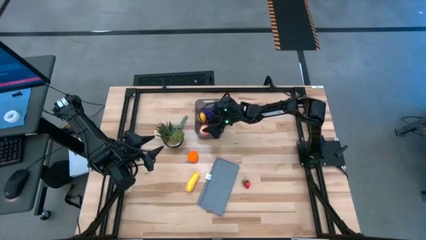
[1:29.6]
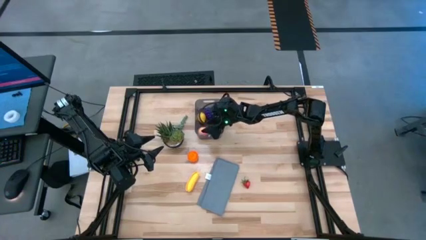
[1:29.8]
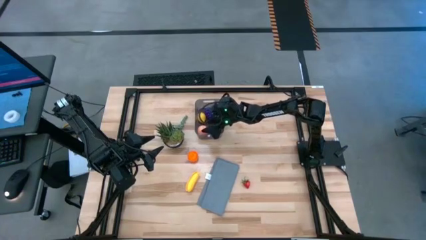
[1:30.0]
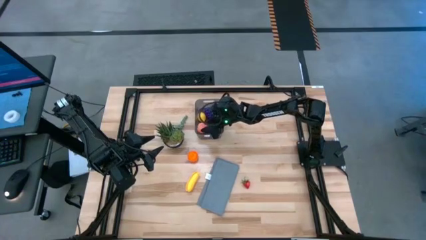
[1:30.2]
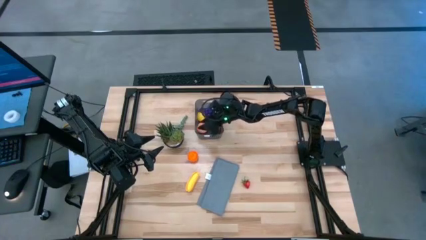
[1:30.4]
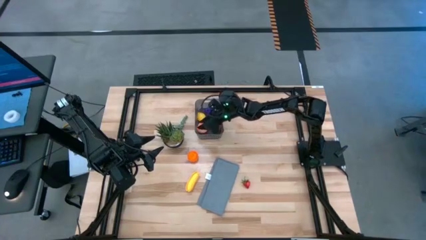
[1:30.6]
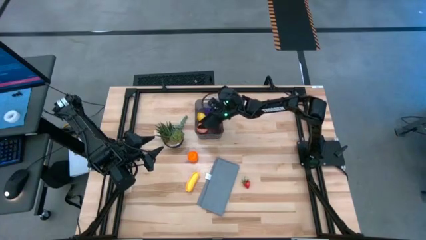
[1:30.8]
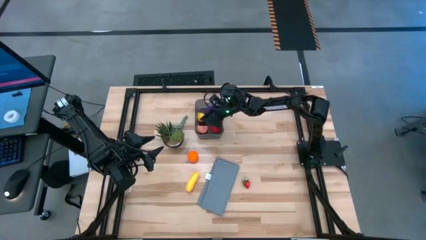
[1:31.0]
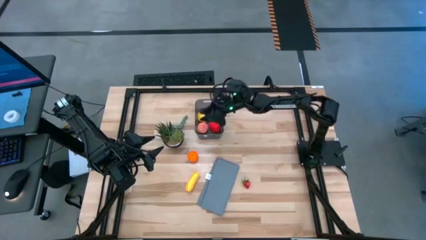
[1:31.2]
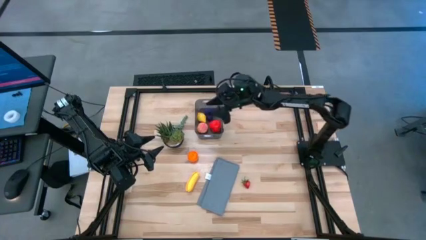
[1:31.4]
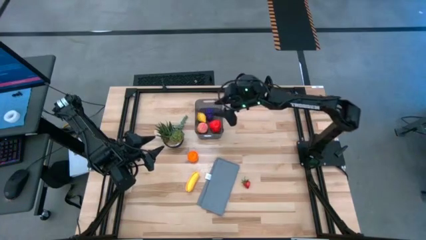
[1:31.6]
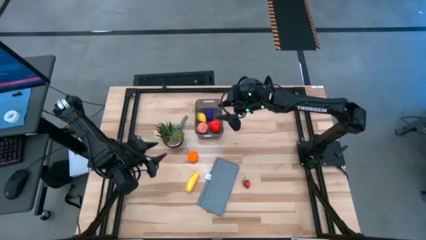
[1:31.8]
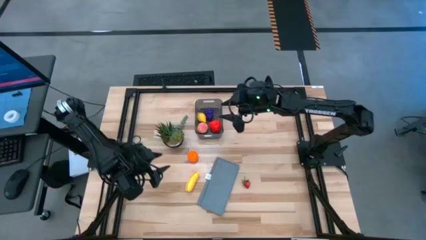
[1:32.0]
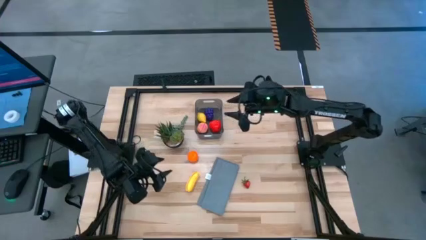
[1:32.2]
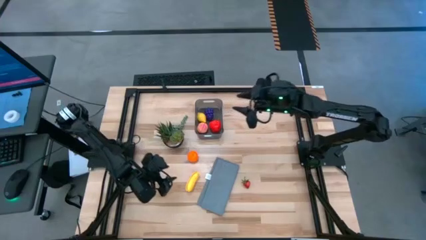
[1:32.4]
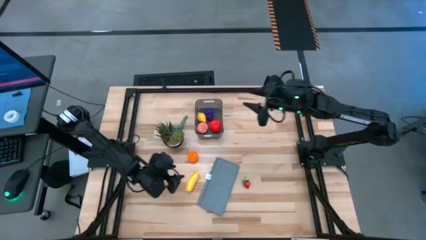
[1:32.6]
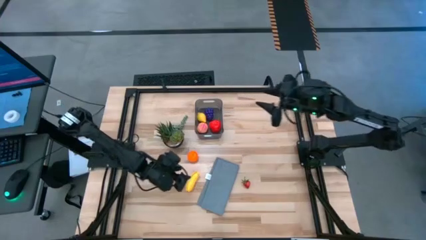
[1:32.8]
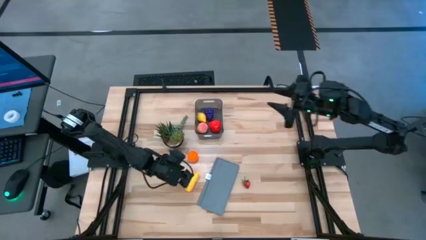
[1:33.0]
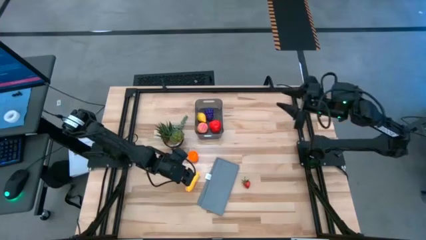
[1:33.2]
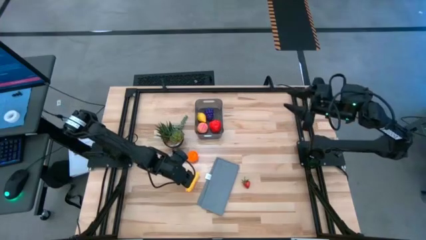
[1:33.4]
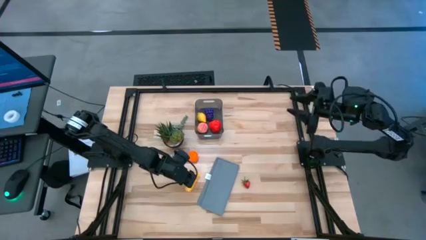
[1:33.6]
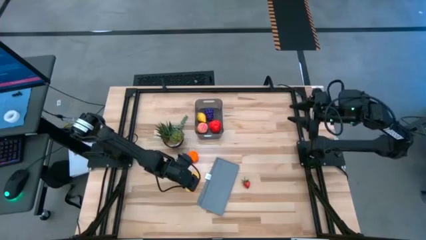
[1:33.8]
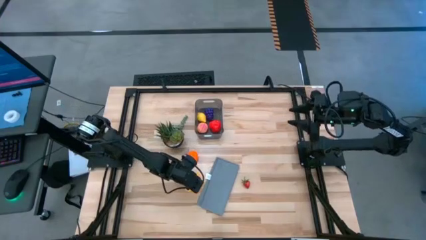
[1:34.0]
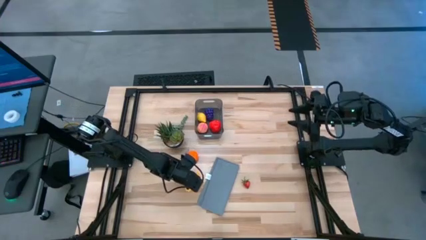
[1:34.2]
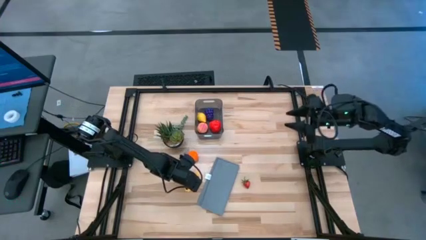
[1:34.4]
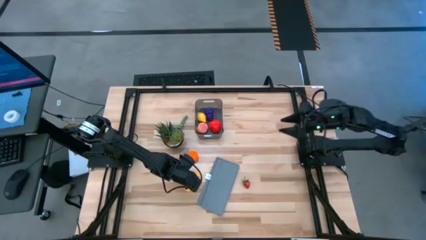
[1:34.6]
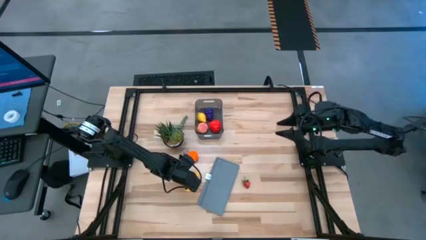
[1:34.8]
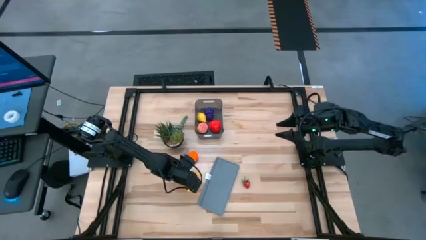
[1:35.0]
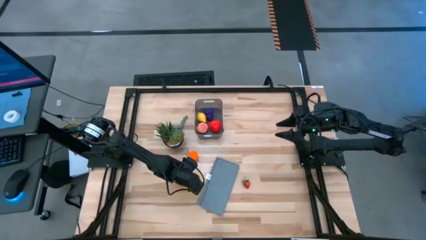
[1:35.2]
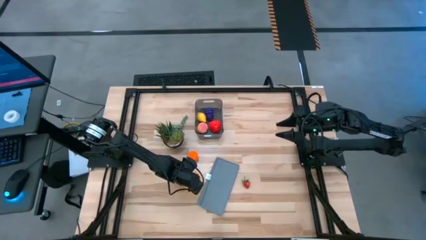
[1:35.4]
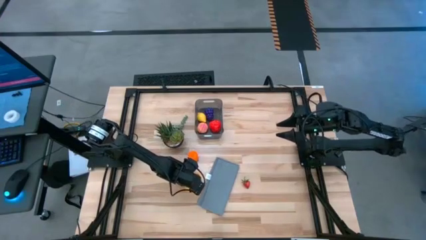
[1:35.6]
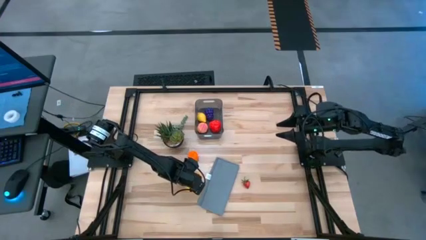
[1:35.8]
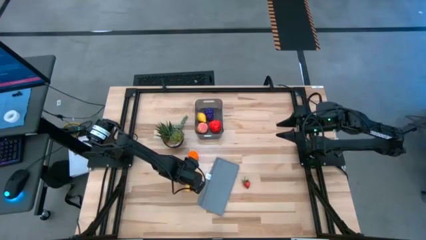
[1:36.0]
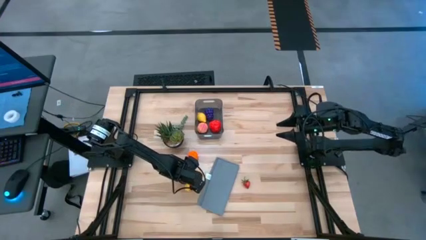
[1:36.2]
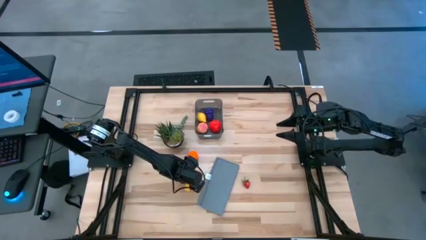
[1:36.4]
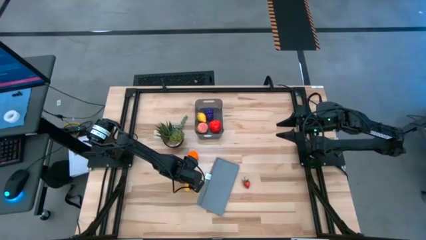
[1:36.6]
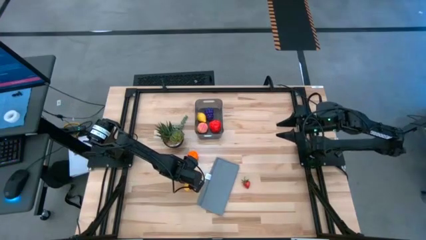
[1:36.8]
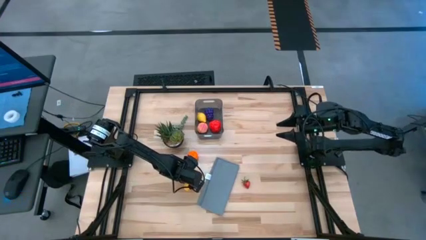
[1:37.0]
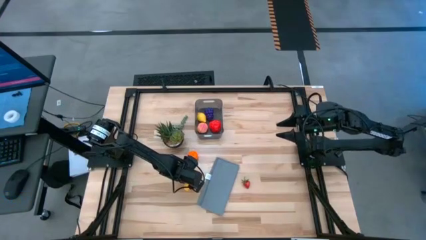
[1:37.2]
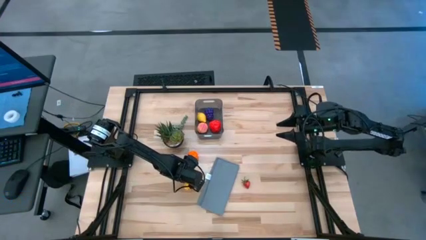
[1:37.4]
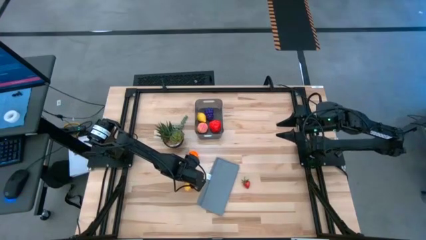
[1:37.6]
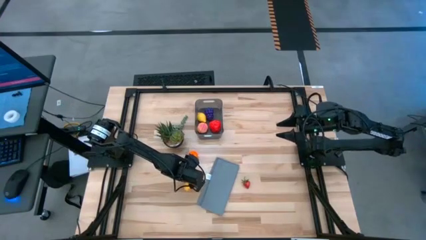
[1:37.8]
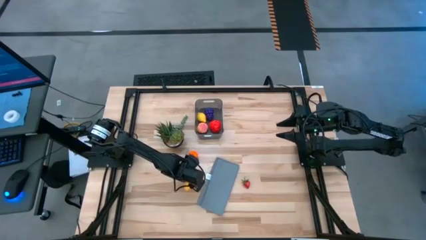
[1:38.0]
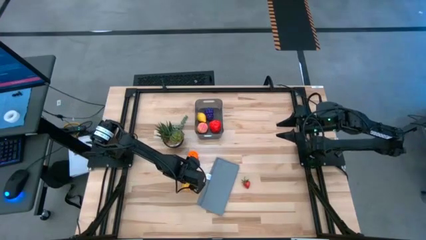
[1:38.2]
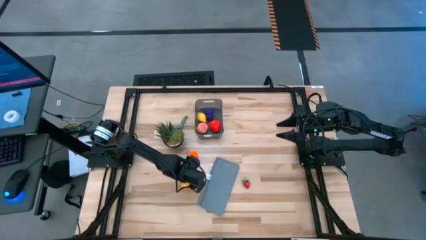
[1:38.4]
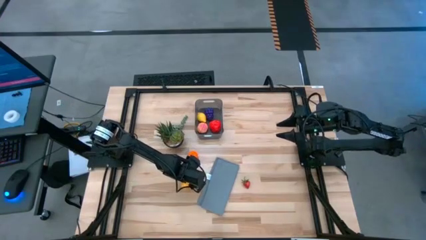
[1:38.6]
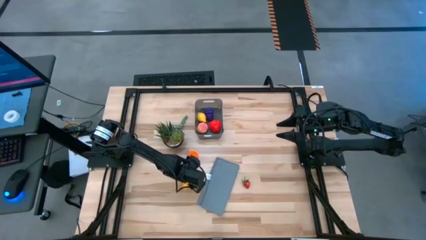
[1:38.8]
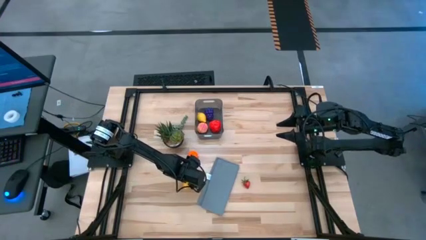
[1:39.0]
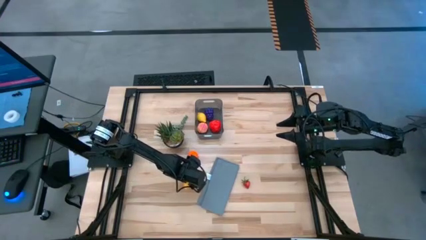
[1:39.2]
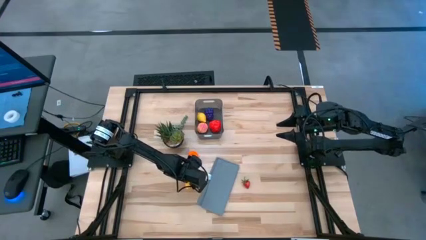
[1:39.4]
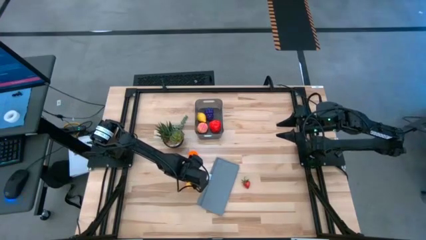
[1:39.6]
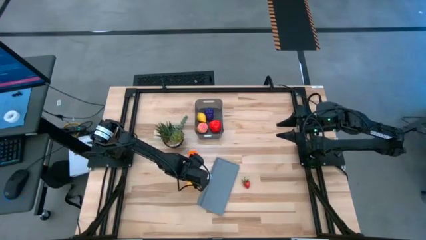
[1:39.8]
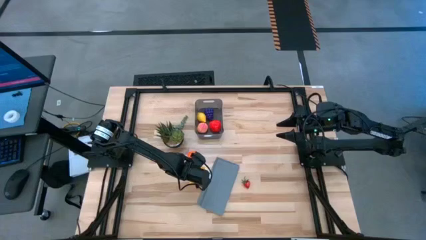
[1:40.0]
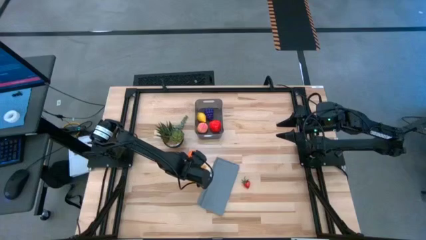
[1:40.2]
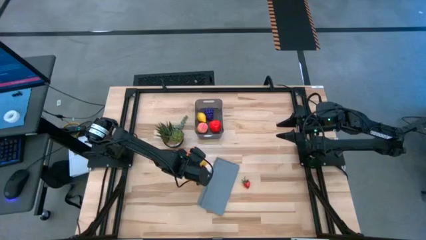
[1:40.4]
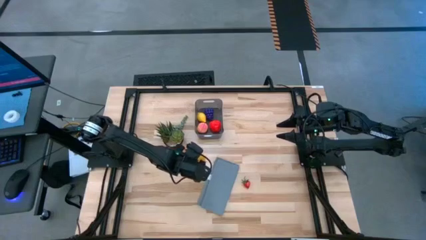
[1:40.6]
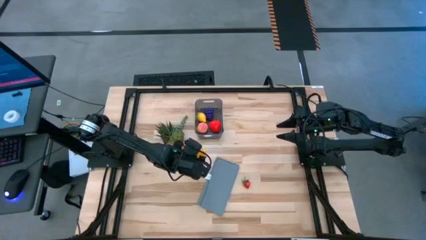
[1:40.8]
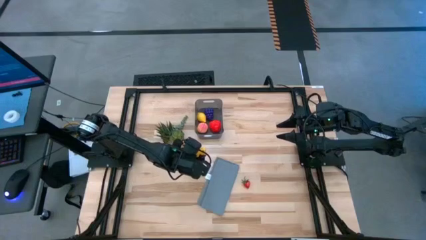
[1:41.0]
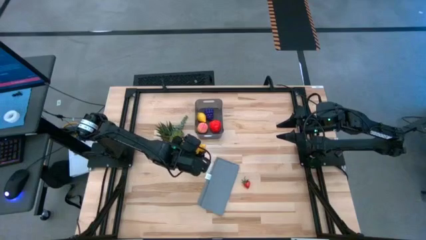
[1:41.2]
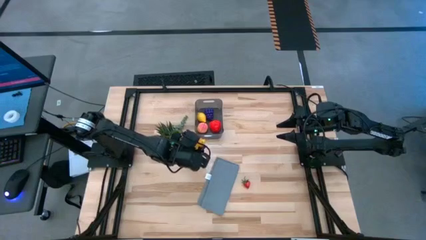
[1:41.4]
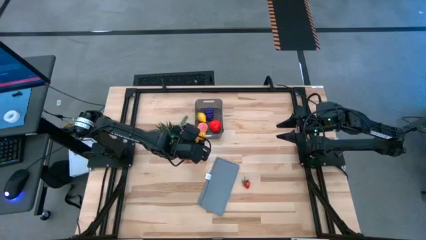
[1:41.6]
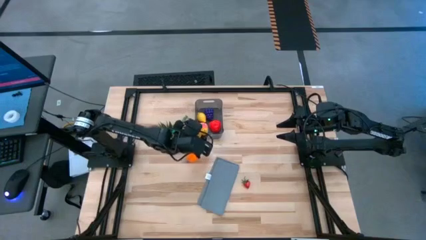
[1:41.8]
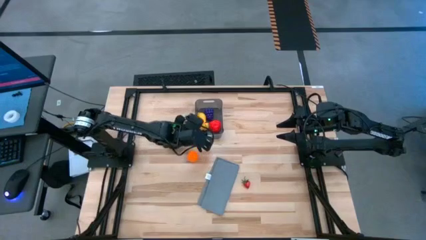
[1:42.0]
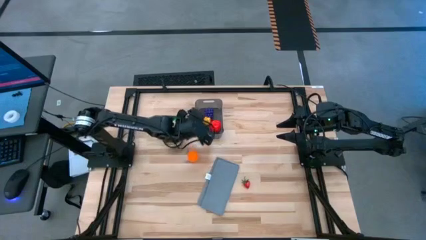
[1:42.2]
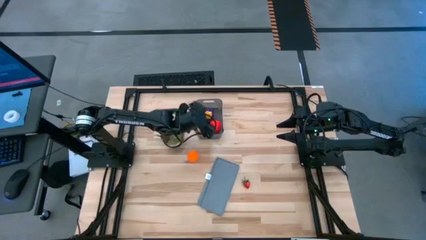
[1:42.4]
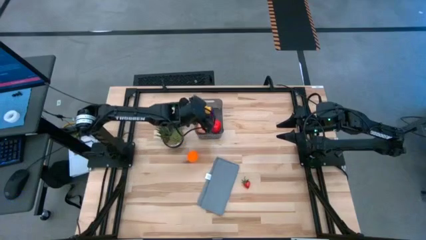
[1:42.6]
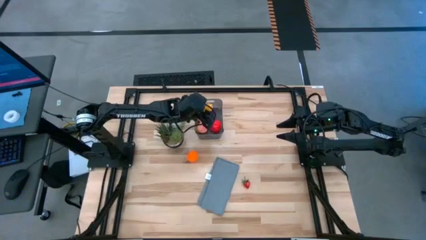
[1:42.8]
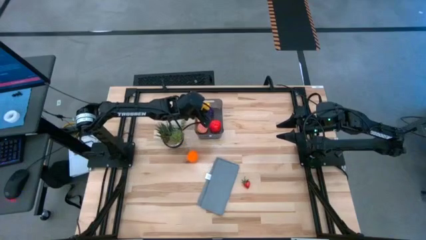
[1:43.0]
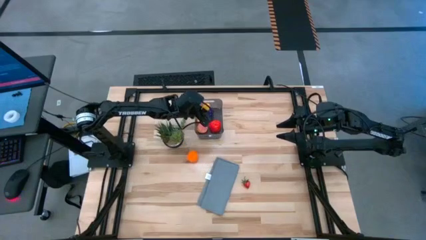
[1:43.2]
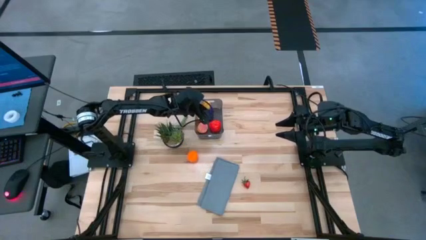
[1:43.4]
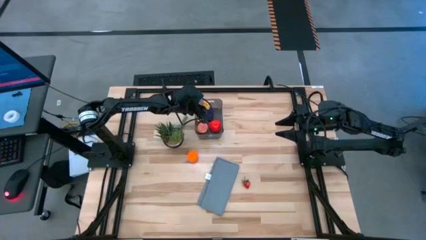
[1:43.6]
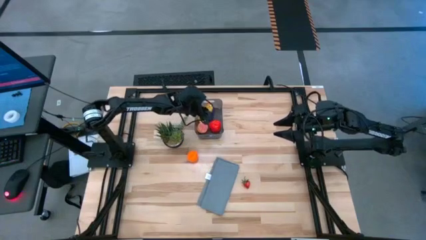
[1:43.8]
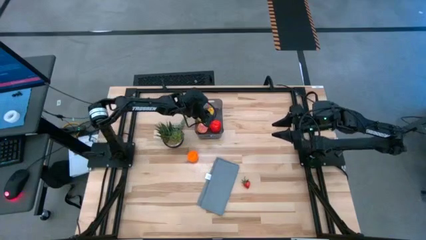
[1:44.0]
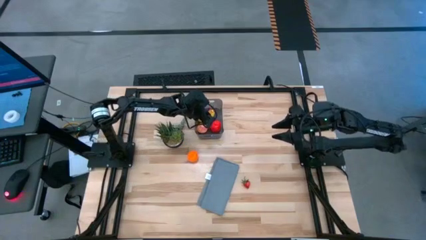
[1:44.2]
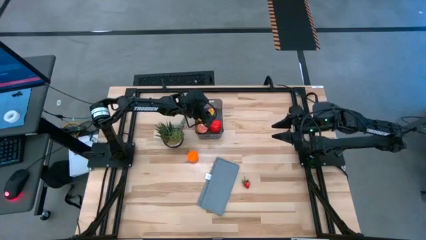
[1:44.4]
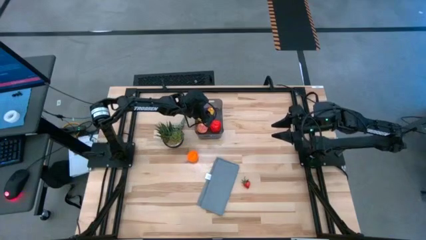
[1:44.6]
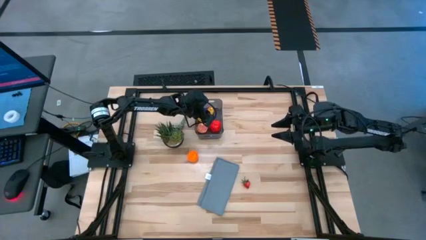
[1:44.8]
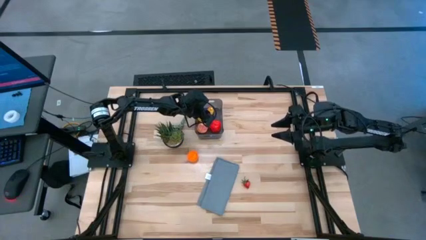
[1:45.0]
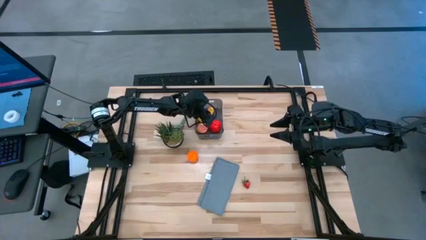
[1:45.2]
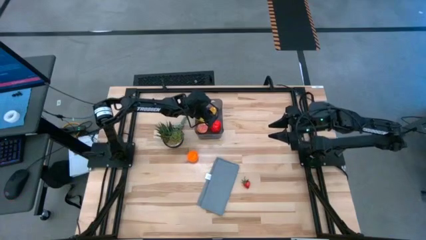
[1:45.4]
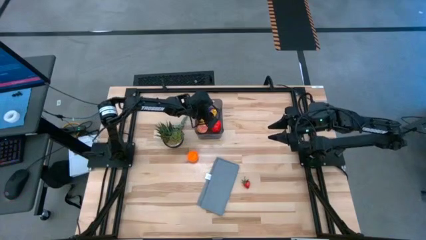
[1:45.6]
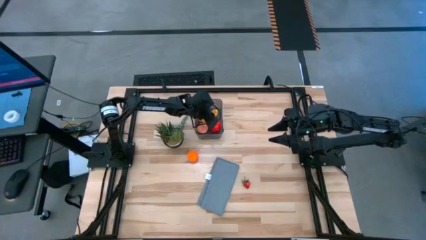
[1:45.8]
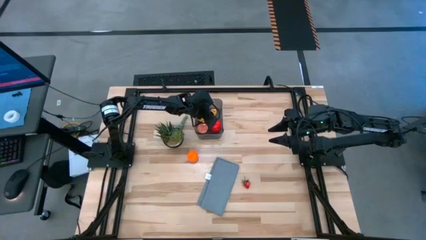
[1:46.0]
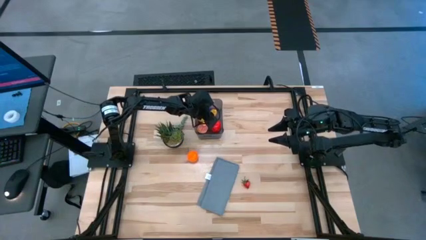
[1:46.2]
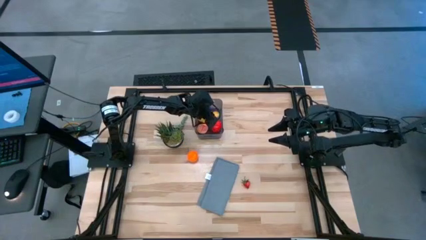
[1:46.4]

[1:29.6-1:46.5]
Task: Pick and placing Produce into tupperware
Put the yellow banana into the black bin
